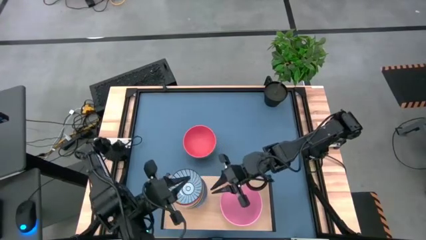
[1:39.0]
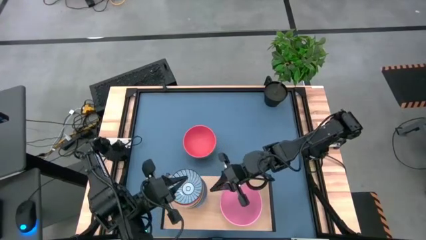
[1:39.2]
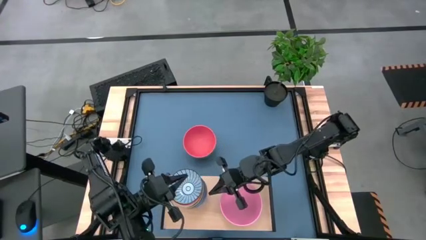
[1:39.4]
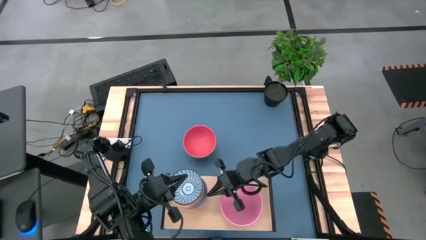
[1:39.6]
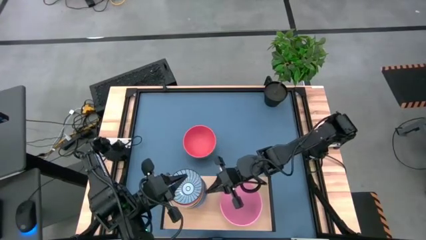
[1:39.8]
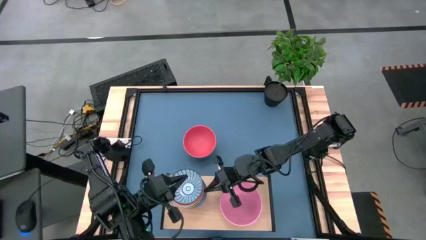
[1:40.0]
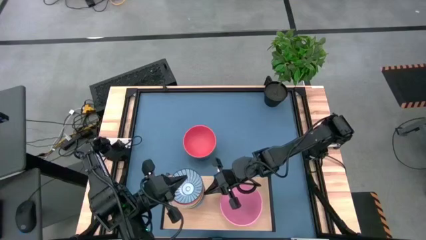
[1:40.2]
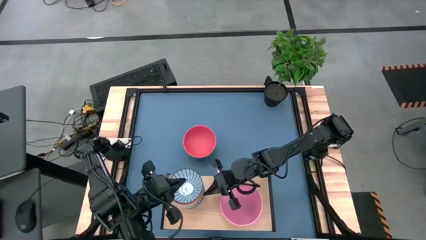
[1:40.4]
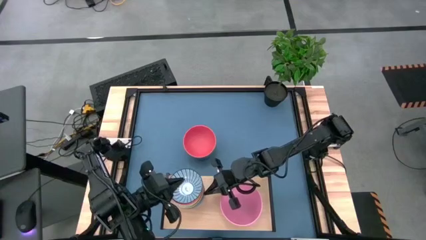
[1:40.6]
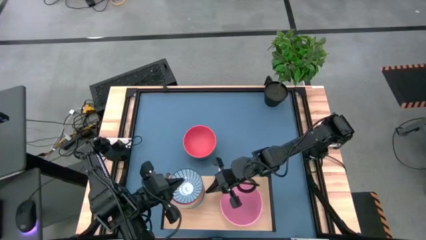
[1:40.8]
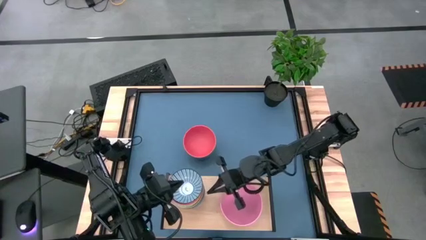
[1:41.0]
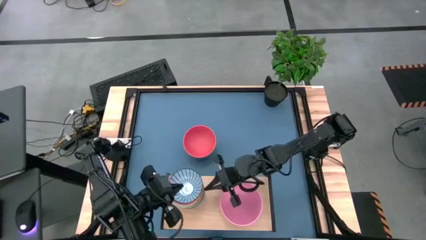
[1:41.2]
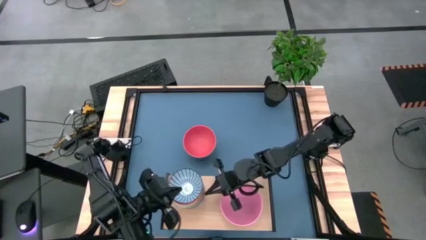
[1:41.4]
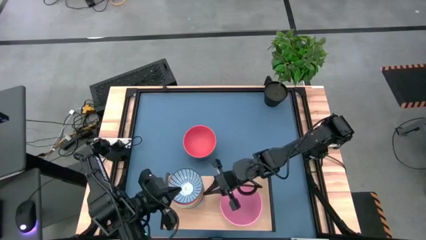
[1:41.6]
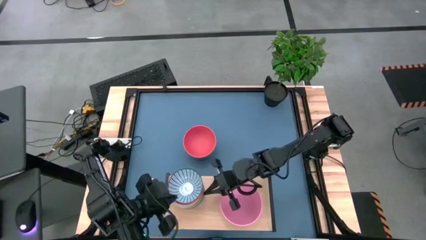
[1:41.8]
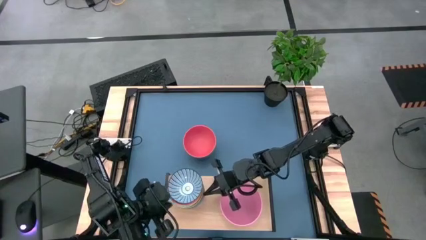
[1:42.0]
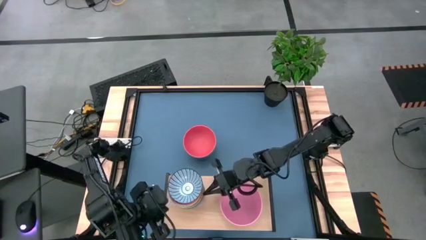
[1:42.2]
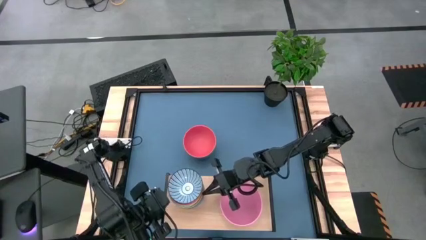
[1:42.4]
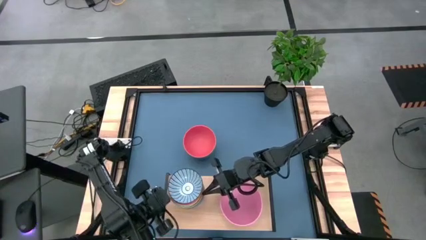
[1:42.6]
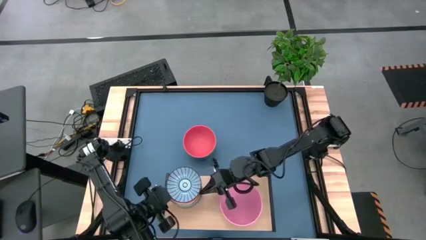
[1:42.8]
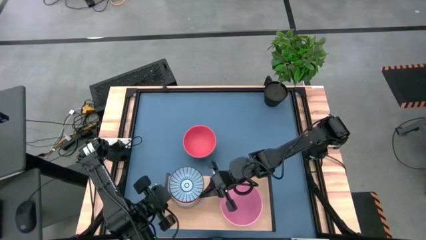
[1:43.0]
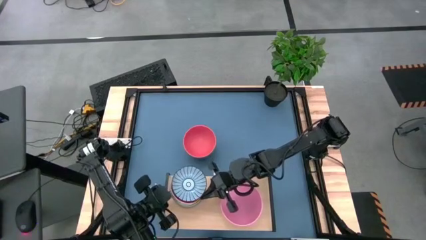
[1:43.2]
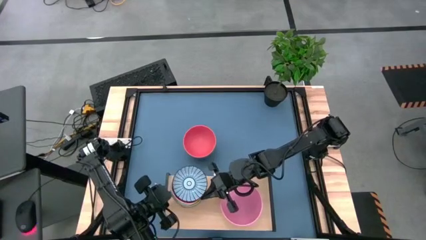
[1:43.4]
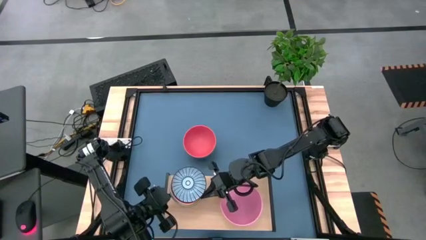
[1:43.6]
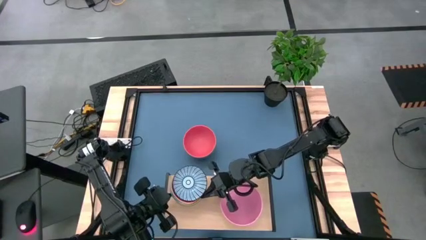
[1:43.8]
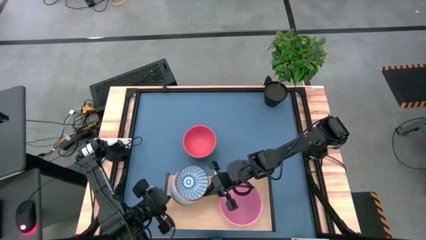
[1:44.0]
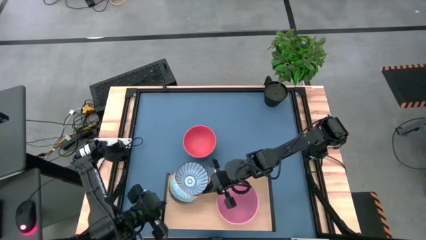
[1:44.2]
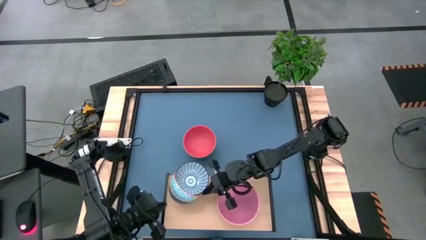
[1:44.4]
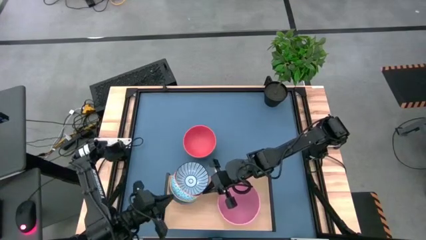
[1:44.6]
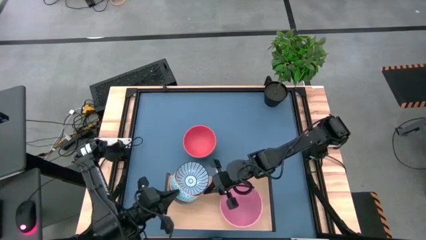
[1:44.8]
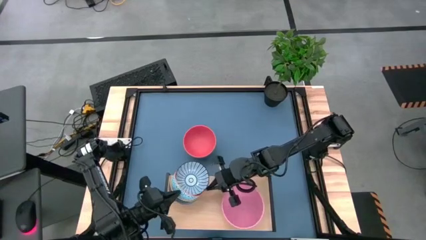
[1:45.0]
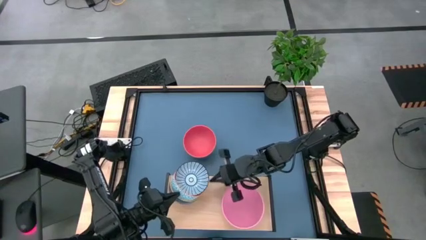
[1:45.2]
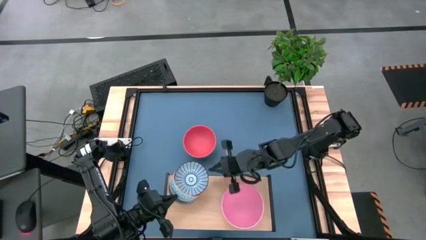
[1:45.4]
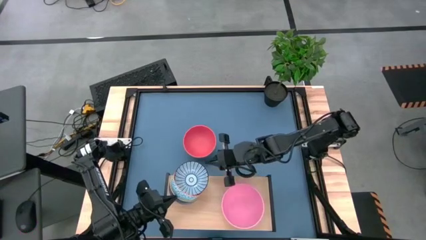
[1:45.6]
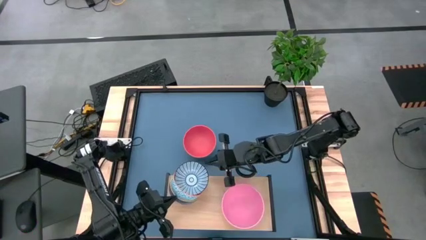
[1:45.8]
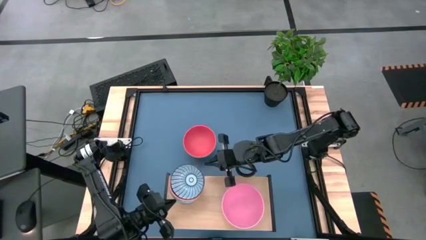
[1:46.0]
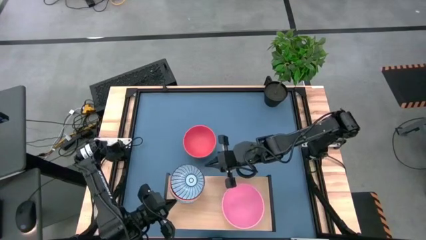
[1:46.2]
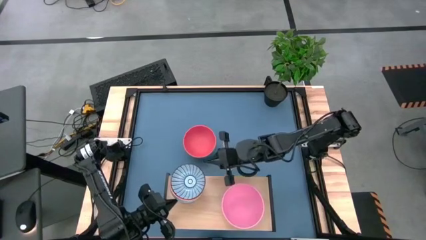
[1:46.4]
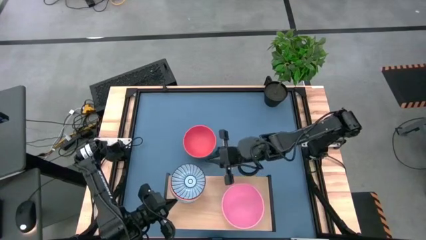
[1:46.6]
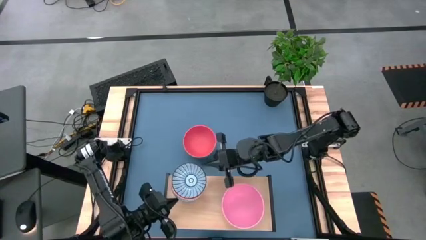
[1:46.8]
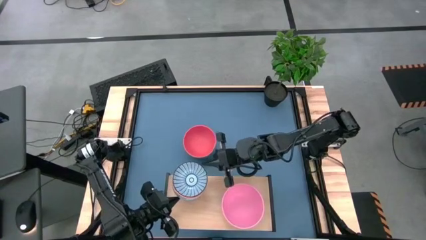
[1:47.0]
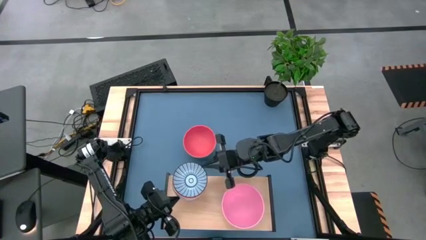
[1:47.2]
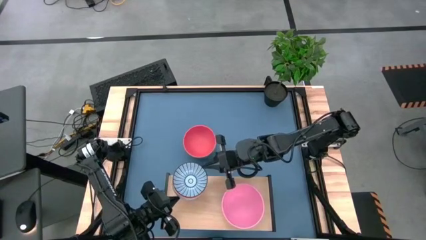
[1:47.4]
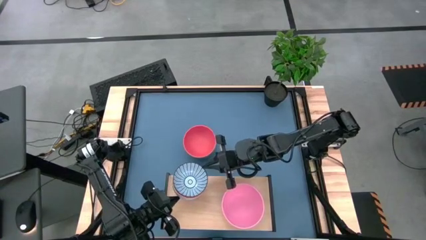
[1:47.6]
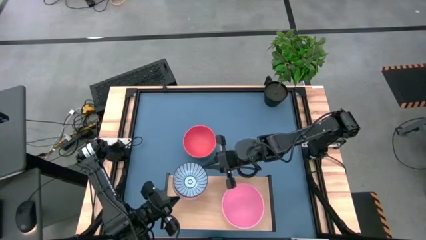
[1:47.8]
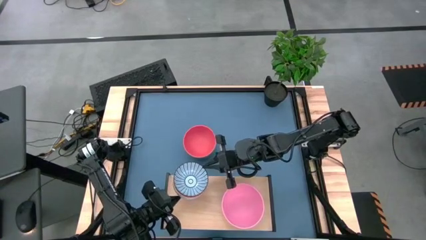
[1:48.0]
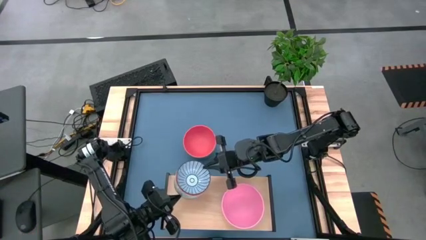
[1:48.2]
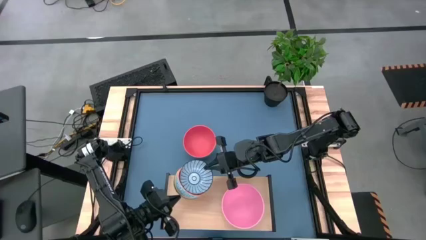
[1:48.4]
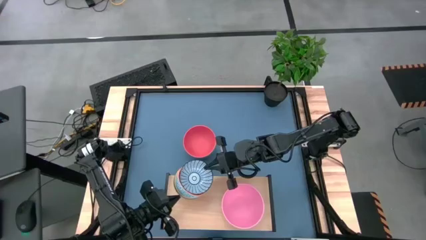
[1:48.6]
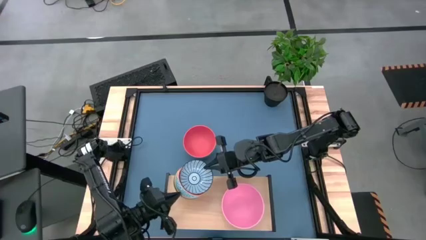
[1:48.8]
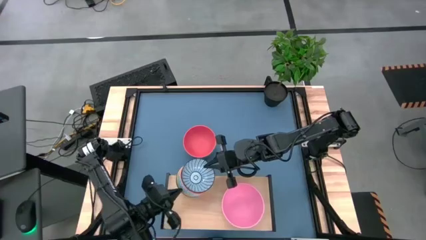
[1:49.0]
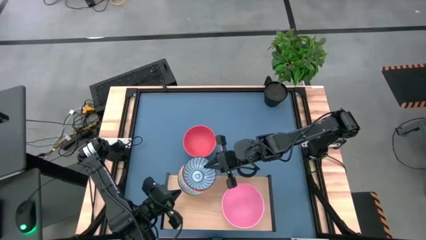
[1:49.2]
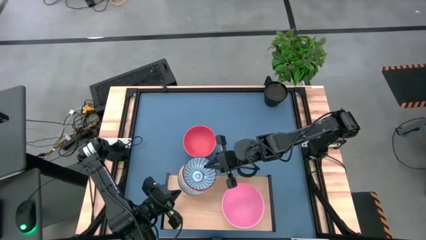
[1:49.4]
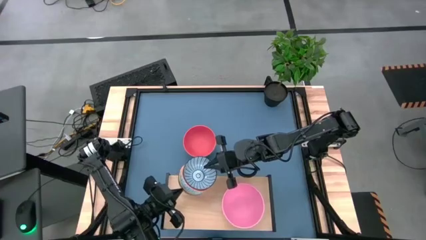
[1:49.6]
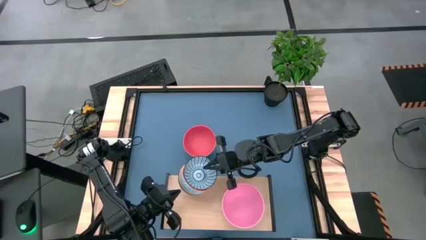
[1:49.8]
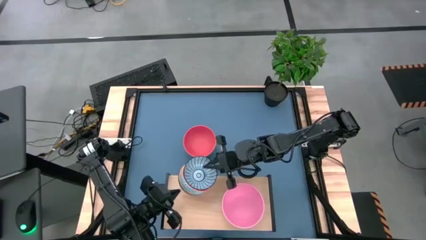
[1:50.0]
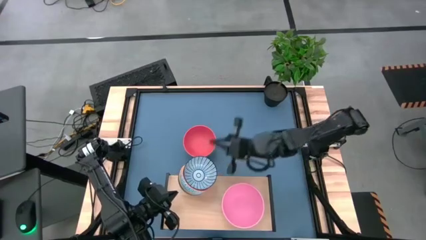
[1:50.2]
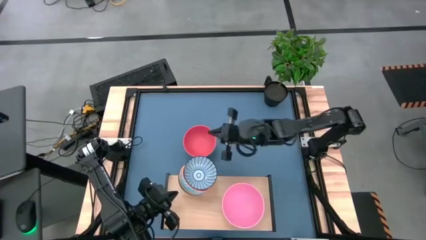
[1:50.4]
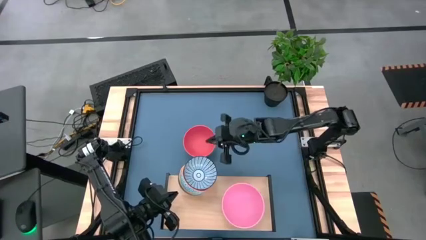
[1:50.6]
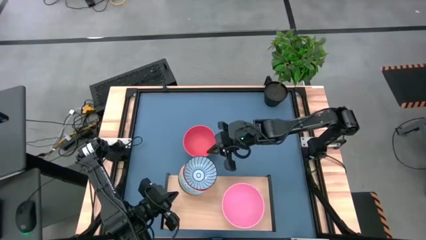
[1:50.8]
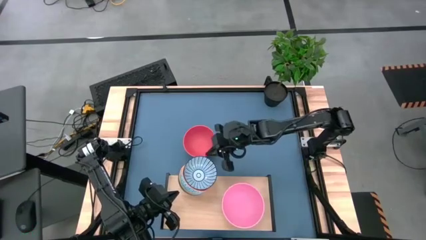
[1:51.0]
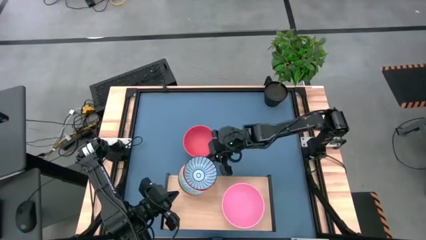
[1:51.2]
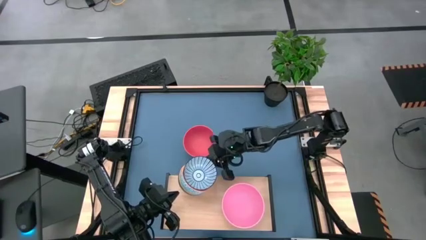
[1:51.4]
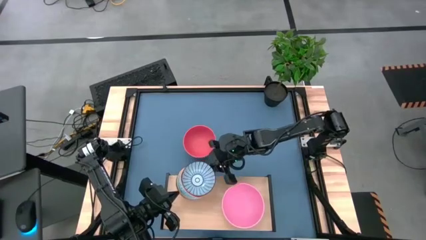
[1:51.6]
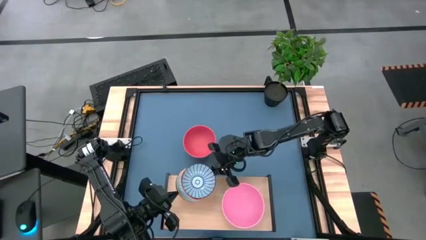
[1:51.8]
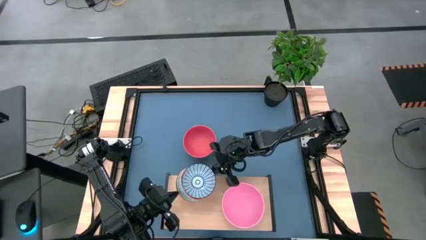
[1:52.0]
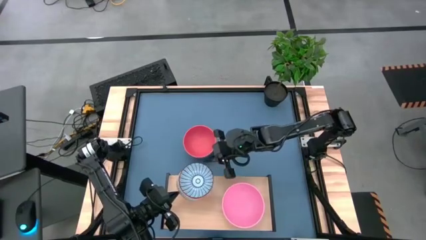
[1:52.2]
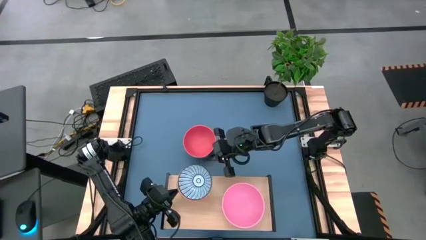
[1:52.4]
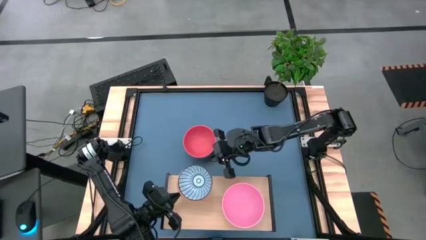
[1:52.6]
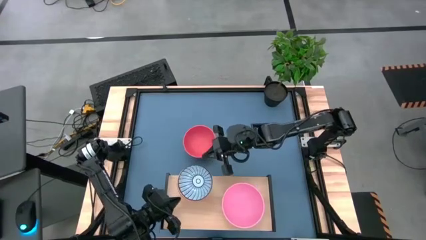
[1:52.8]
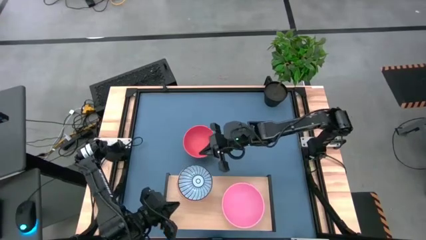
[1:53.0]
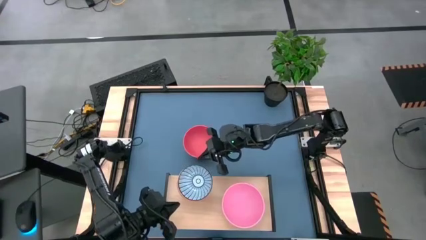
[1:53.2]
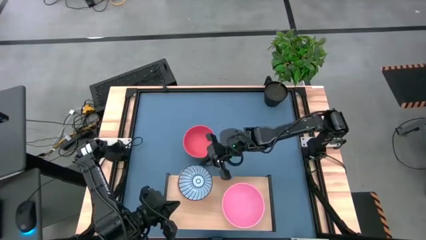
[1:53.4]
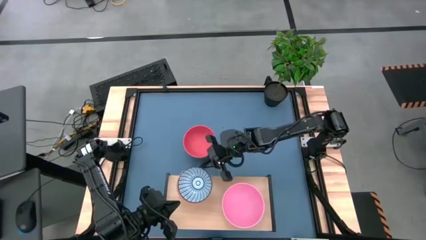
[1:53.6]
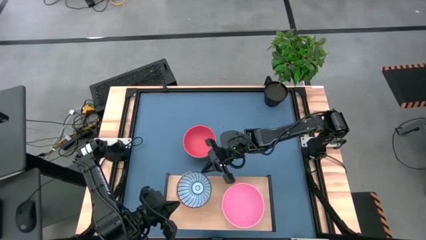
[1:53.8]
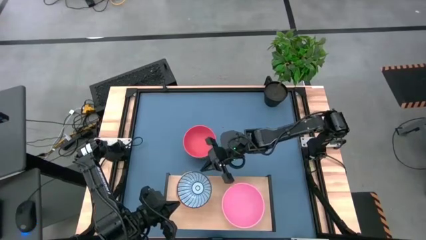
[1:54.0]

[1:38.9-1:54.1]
Task: Place and stack bowls onto a shelf
Adjust the stacked bowls on the shelf
